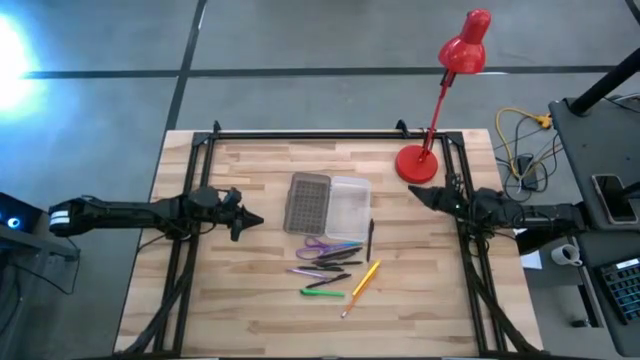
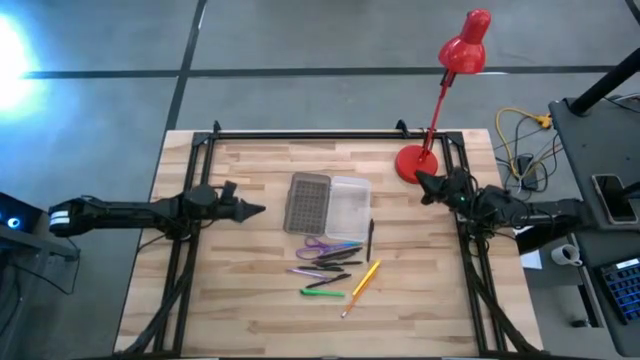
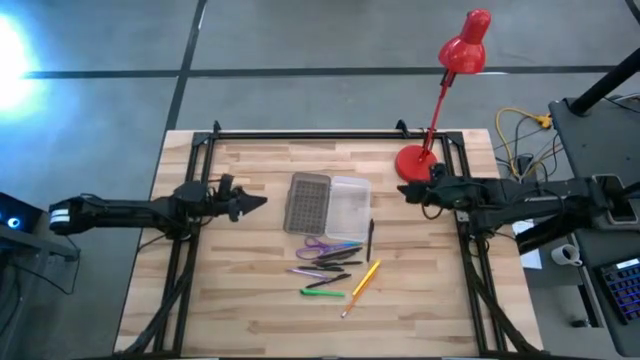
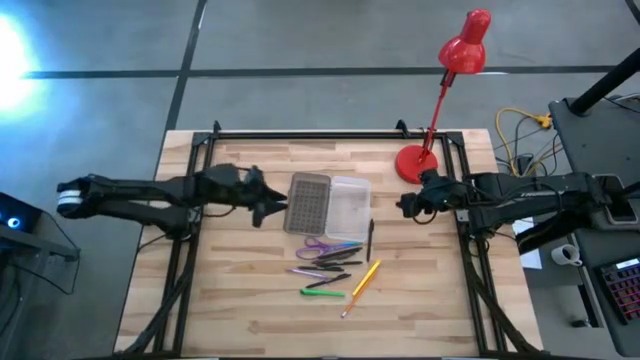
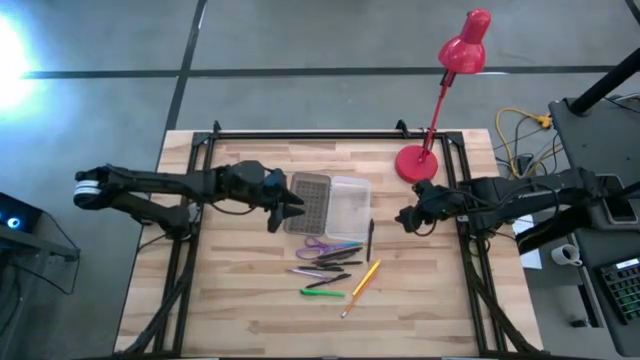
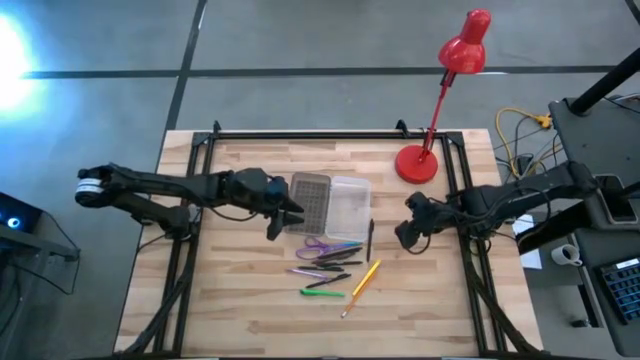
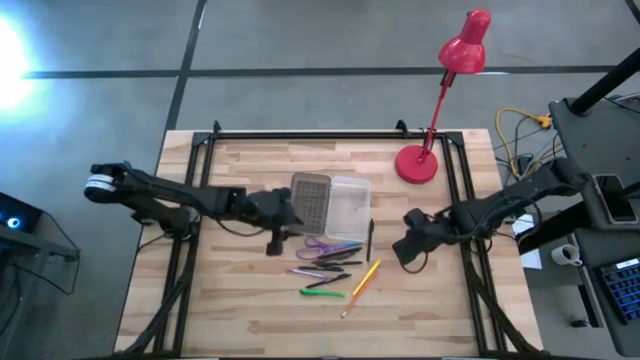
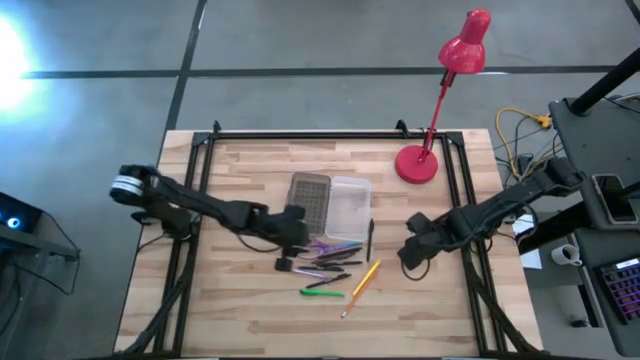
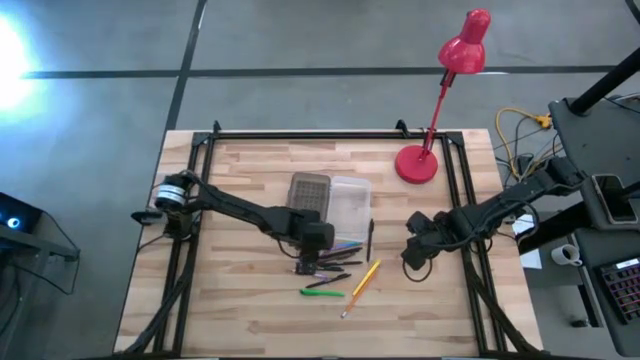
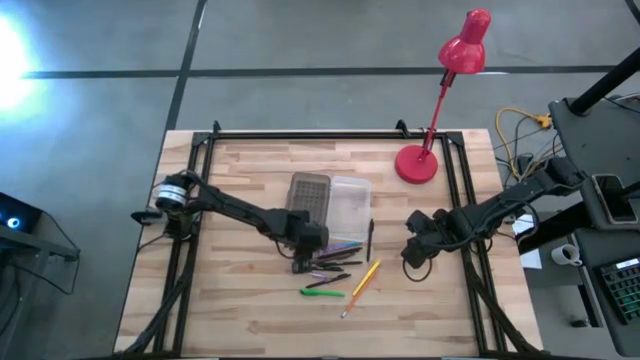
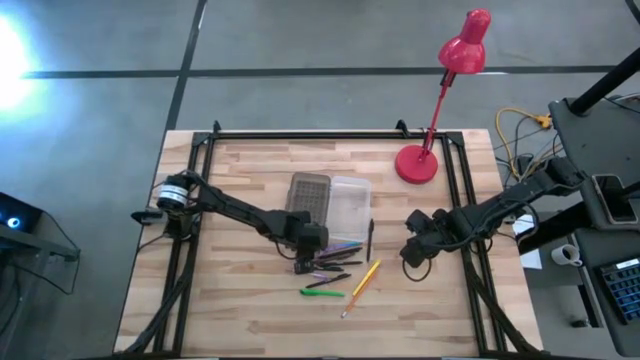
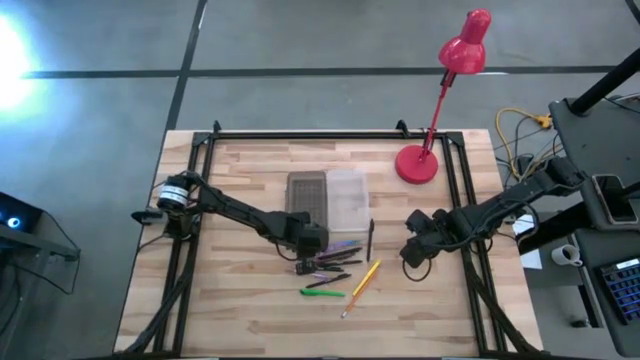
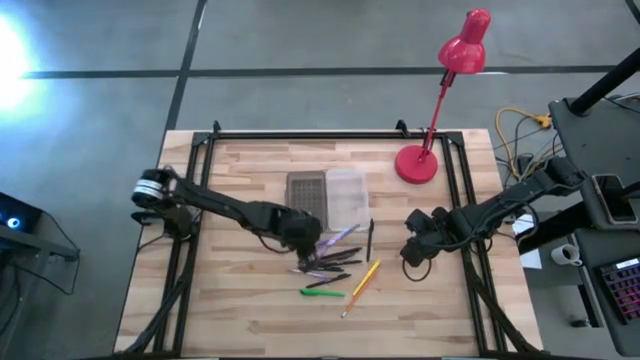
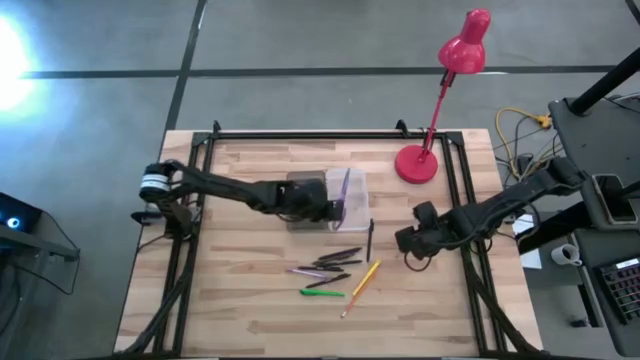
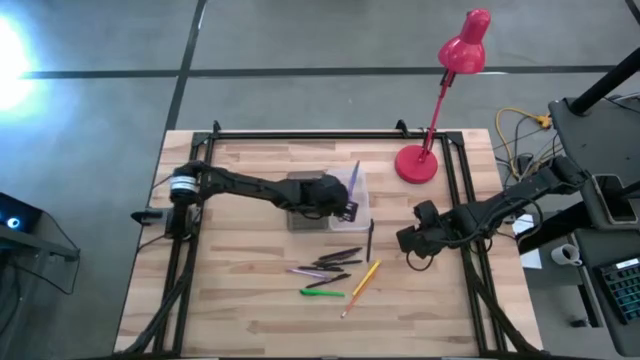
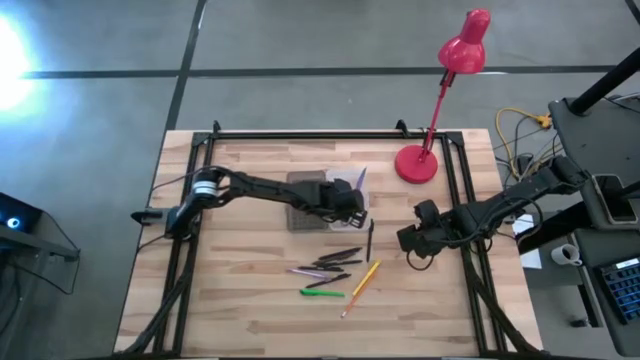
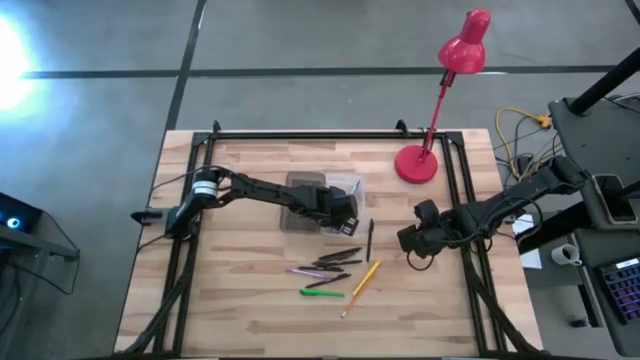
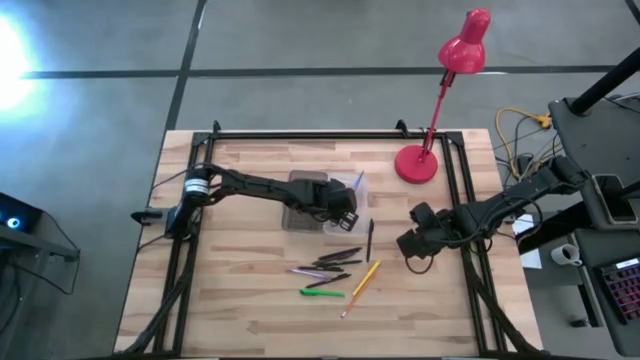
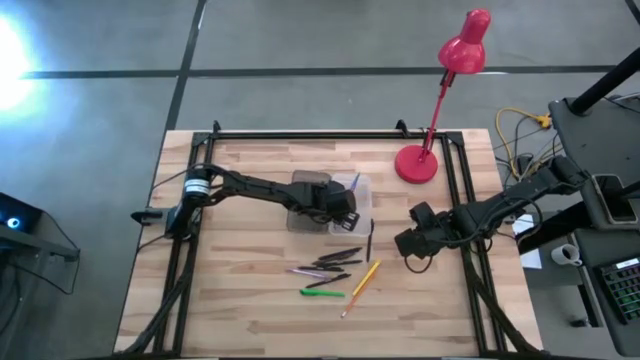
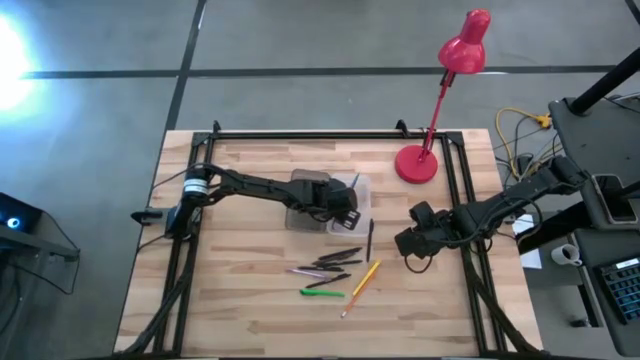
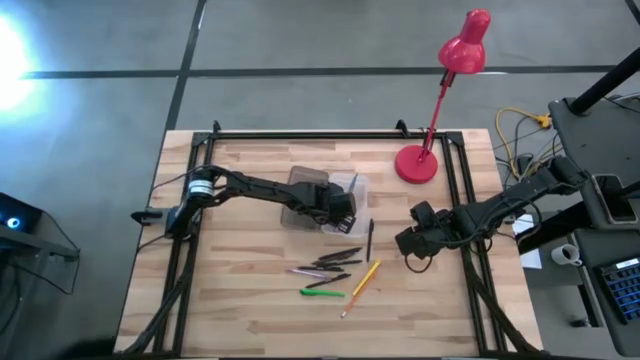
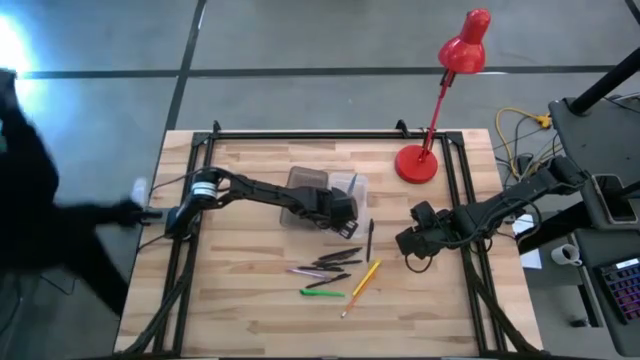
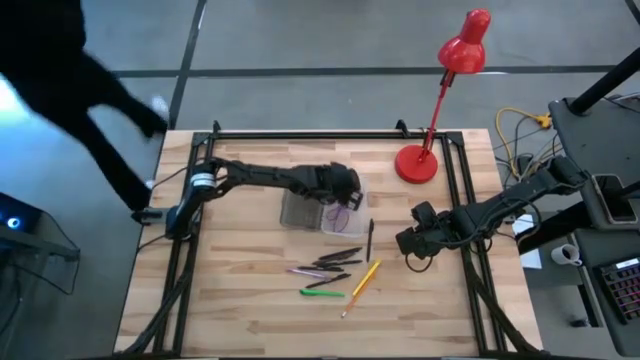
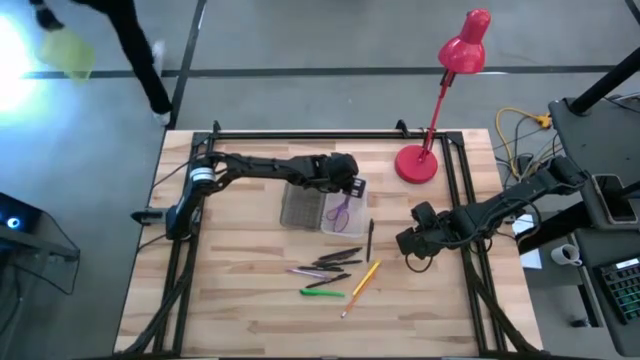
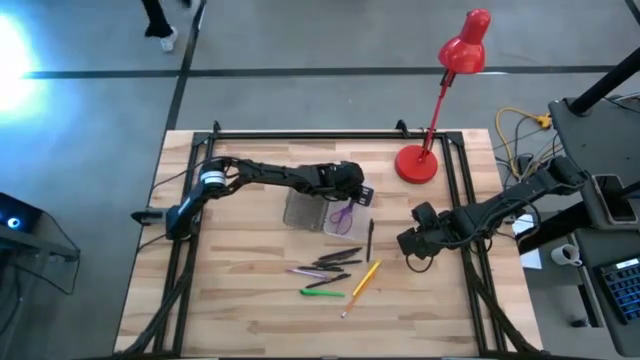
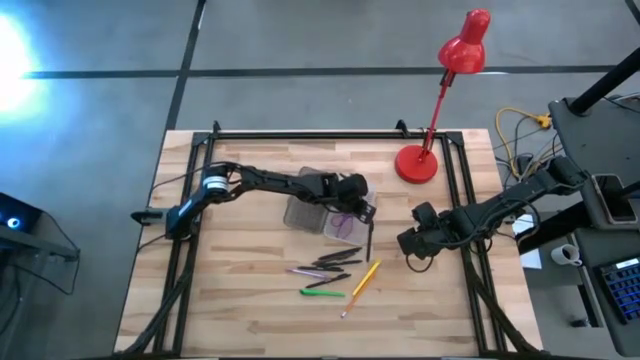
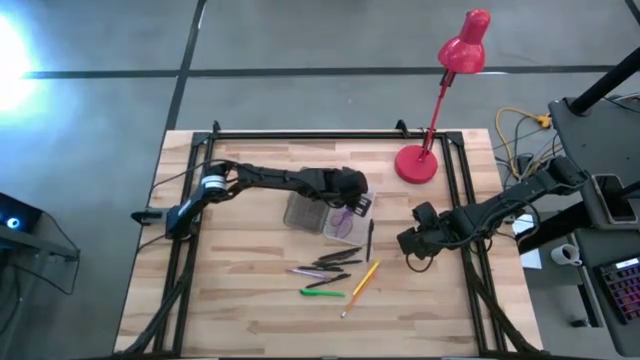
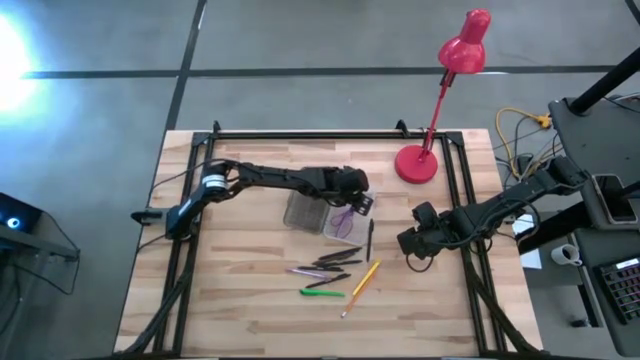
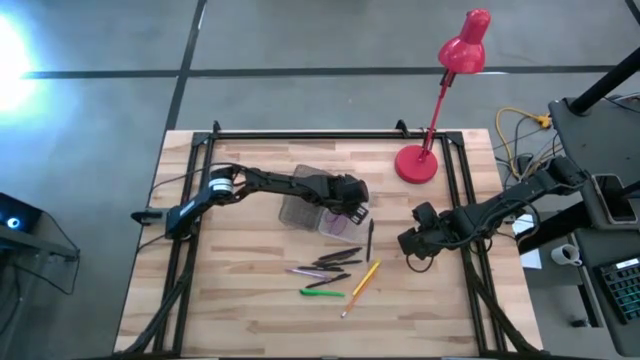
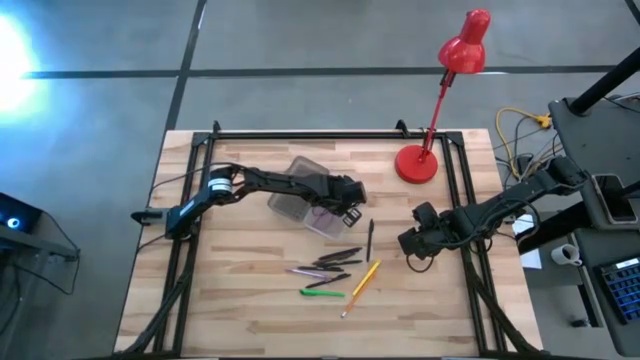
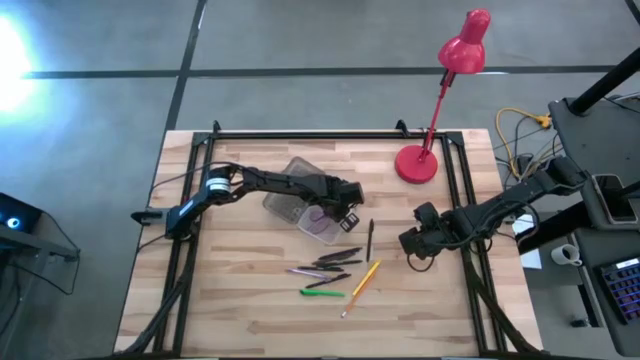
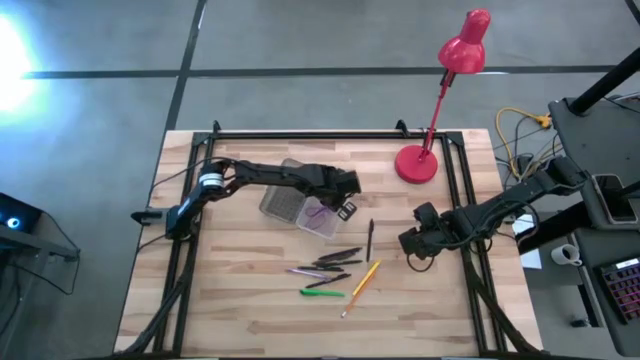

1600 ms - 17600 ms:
Task: Pick & place school supplies into a supply box
Put the violet scissors into the supply box

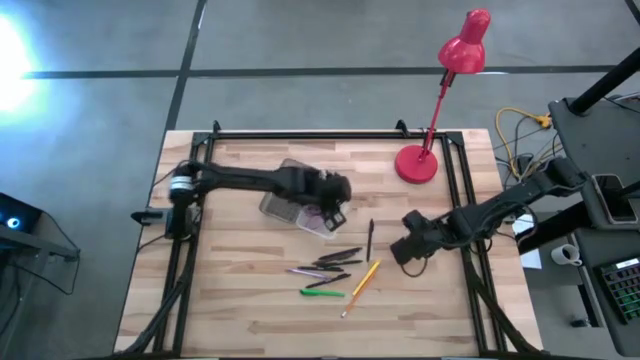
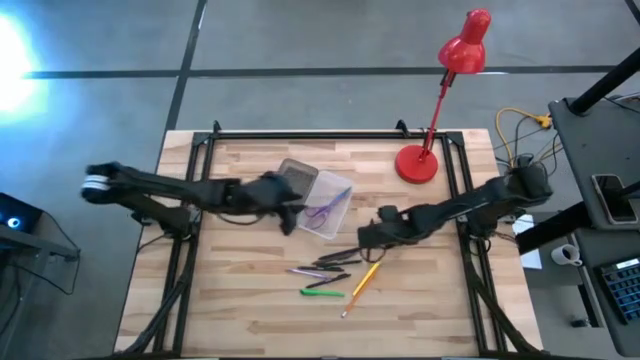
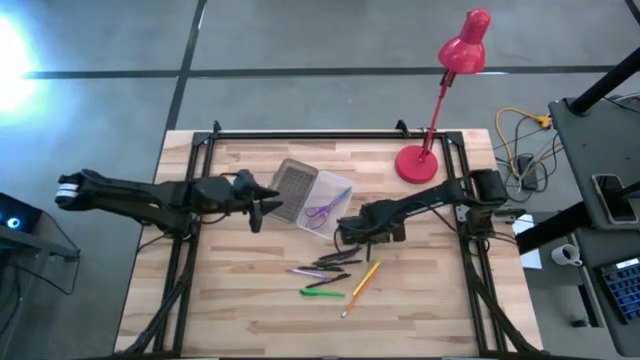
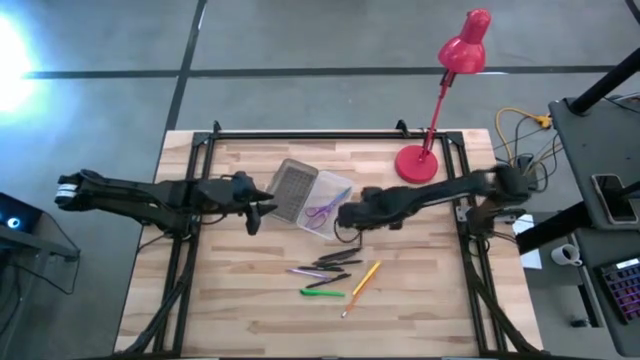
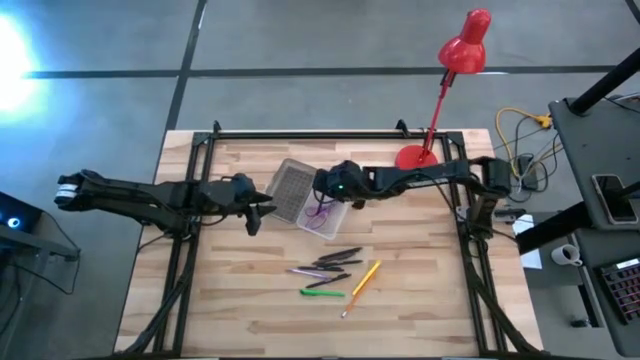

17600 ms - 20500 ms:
Put the black pen into the supply box

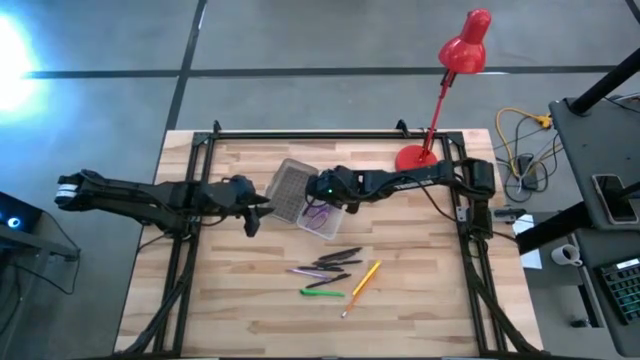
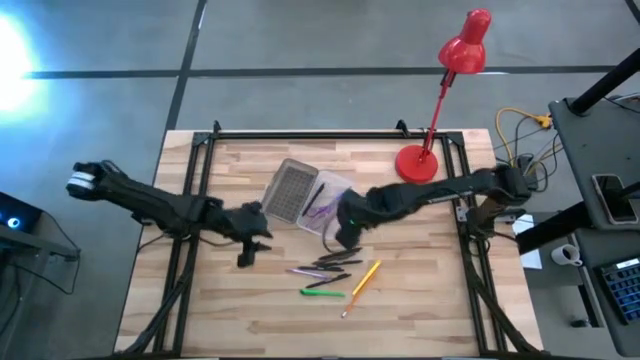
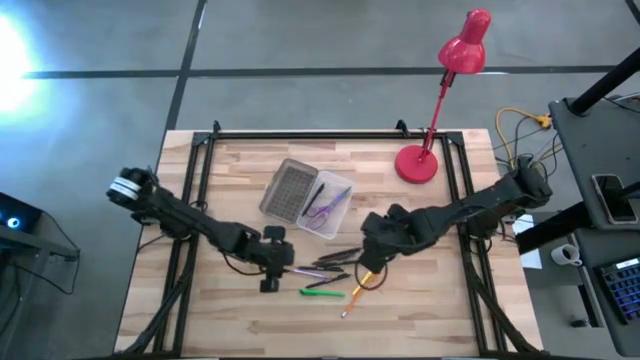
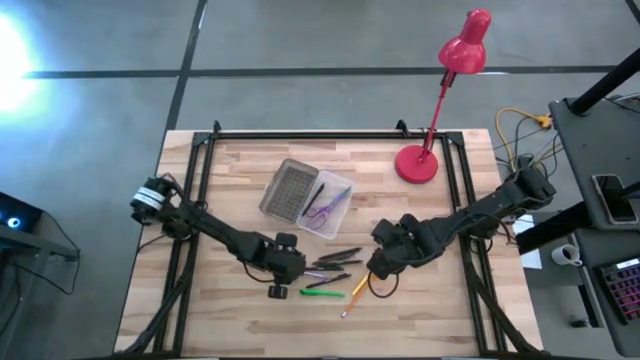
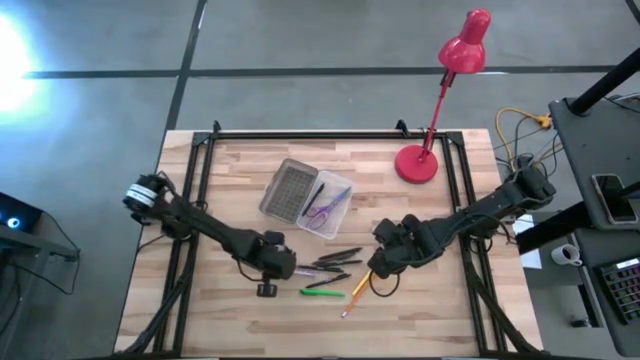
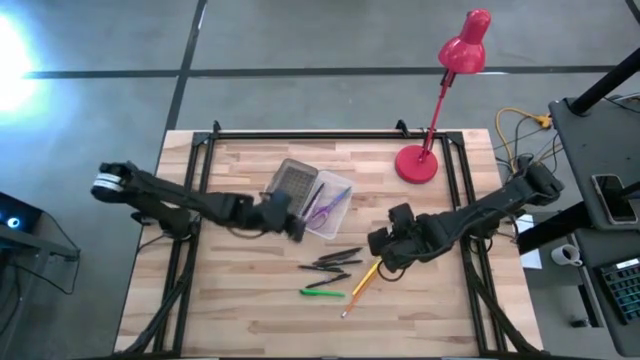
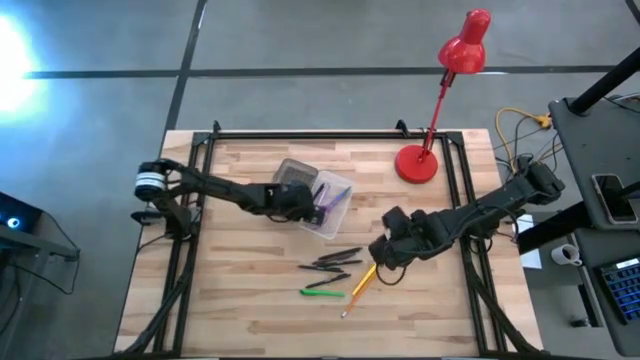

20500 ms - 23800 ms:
Put the violet pen into the supply box
